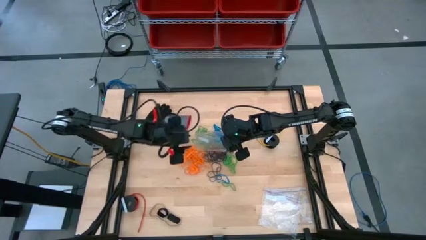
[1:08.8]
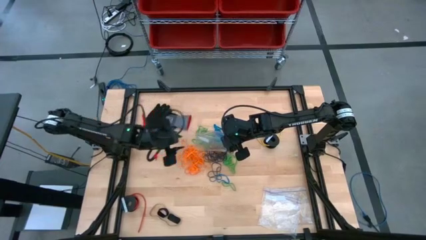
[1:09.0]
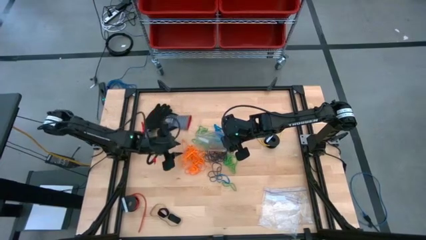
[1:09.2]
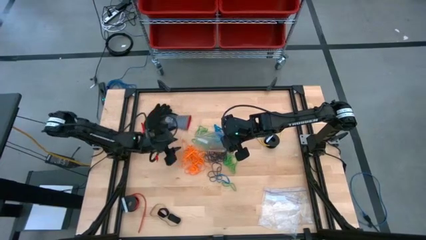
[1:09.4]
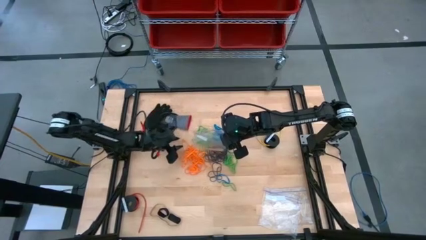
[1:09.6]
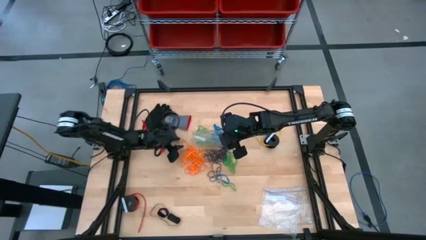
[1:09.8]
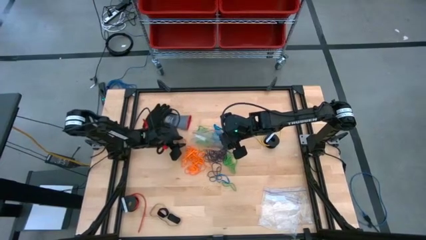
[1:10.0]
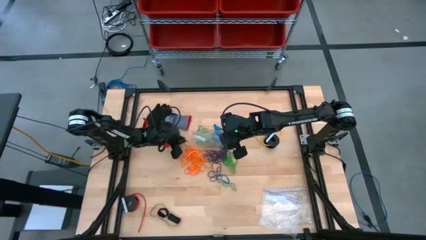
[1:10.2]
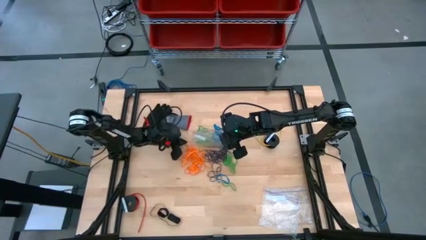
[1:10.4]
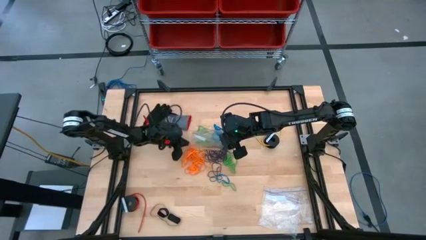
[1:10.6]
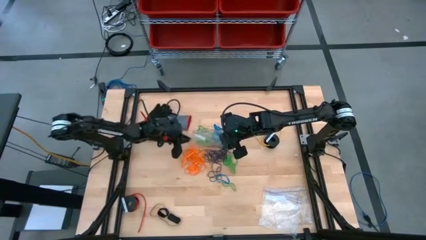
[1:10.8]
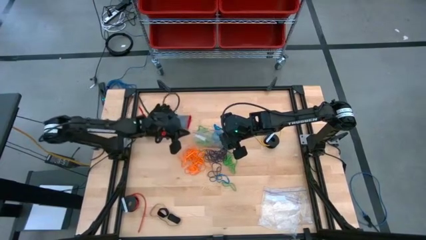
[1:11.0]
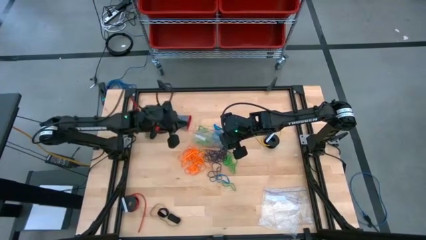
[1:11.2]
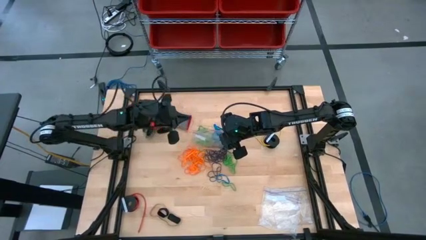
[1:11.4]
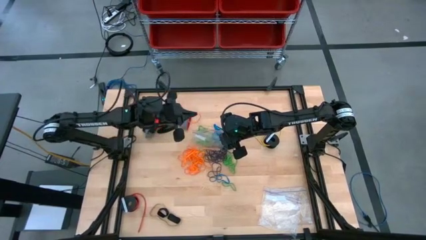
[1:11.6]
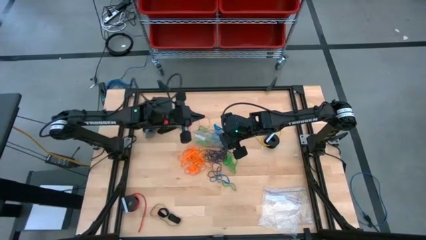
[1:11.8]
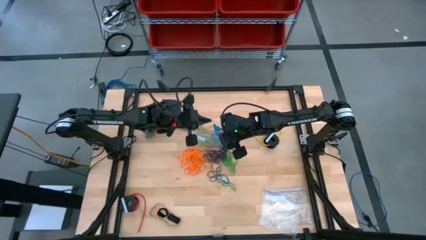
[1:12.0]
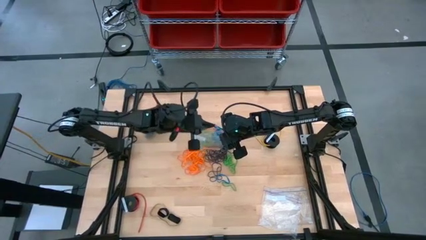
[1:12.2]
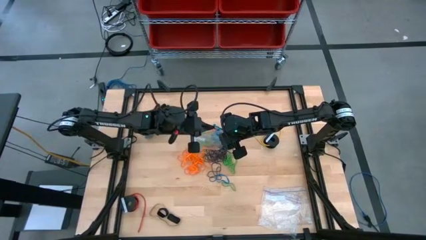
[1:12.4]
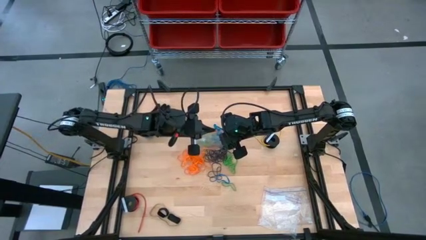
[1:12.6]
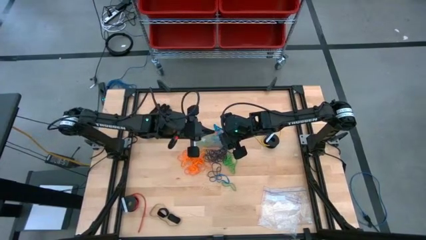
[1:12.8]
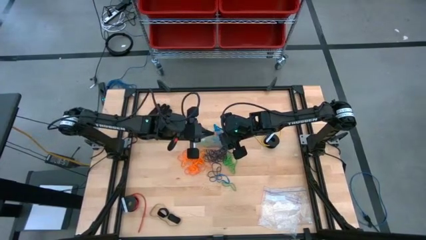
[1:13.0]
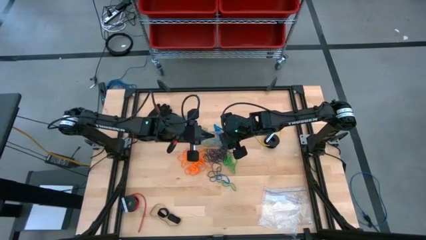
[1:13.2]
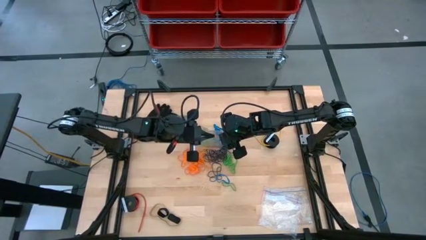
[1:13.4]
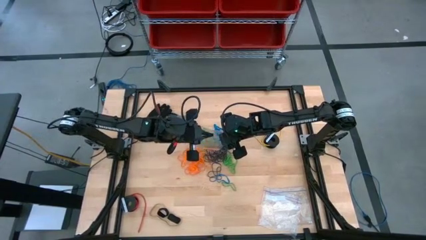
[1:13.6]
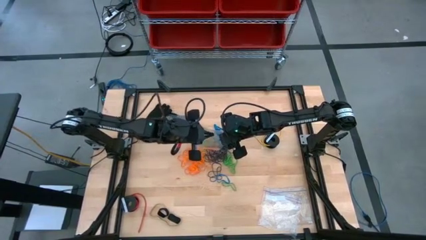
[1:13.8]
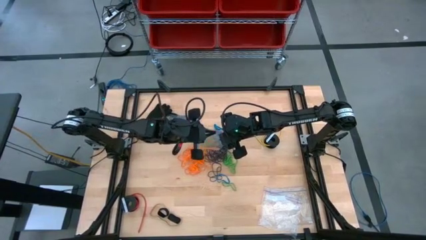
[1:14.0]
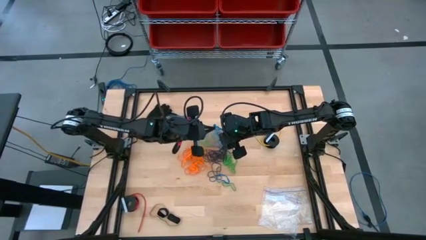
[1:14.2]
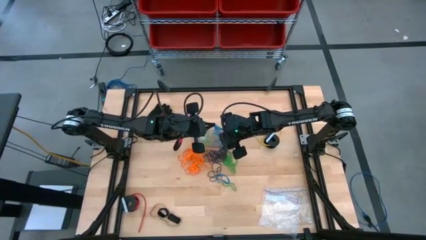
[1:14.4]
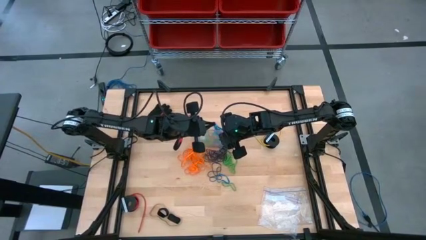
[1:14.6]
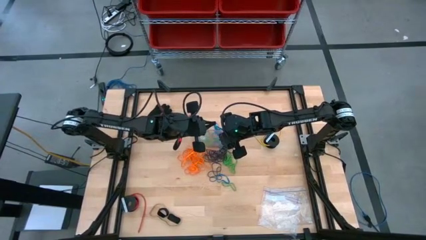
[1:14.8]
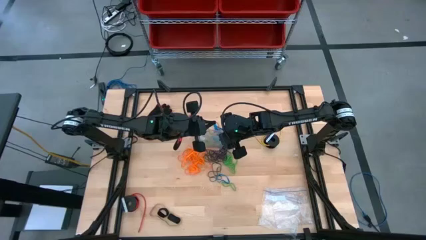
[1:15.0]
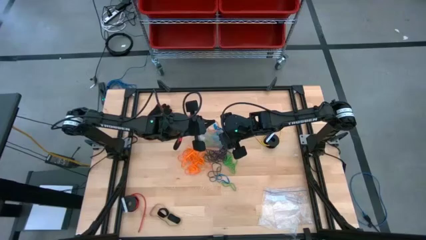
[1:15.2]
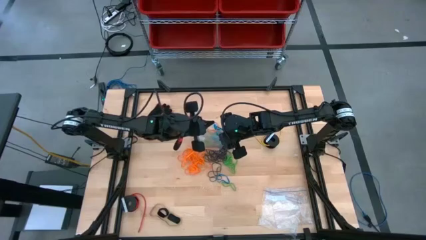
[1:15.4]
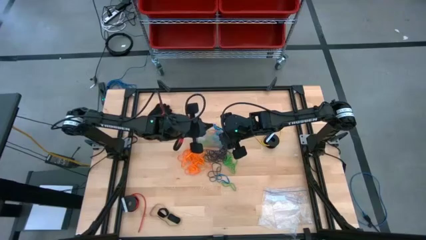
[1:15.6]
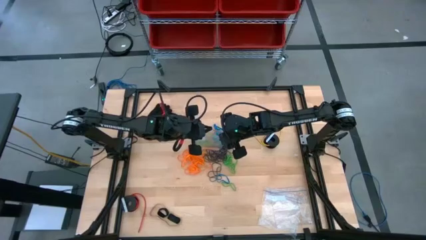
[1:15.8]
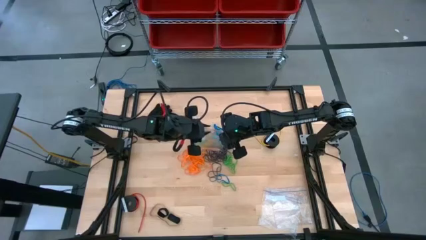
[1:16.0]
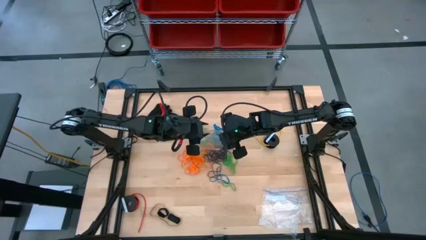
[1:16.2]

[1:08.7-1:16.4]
Task: Sort rubber bands
Put the orange rubber band into the transparent zip bag

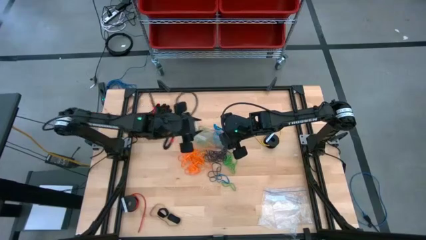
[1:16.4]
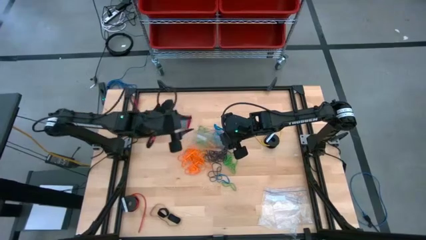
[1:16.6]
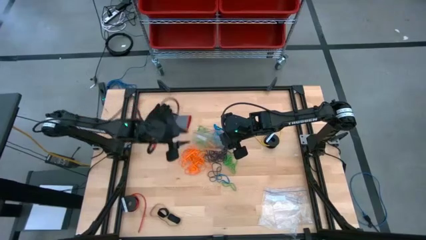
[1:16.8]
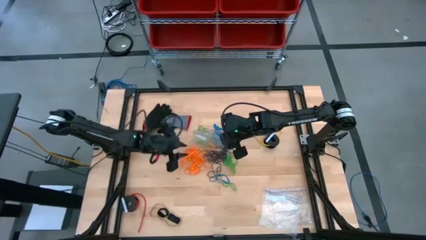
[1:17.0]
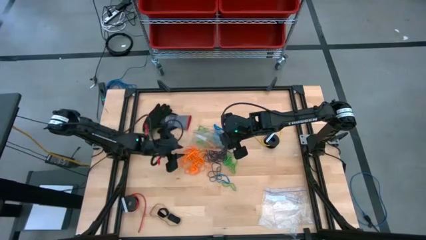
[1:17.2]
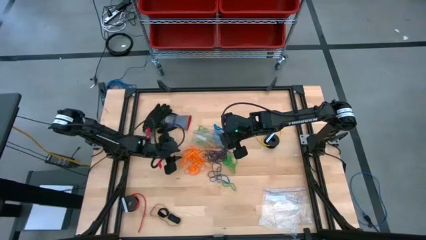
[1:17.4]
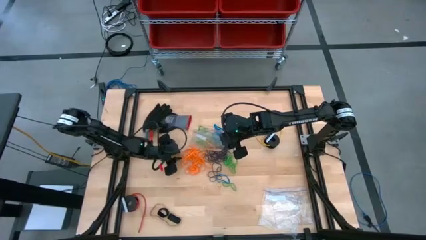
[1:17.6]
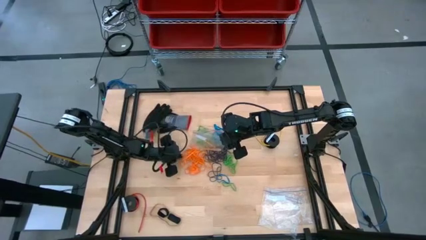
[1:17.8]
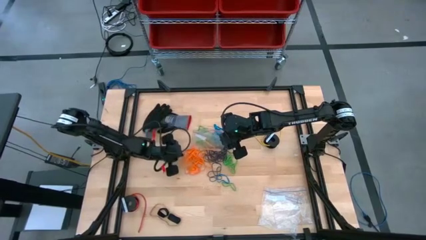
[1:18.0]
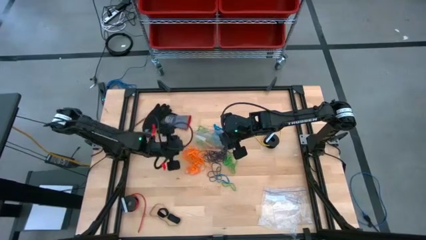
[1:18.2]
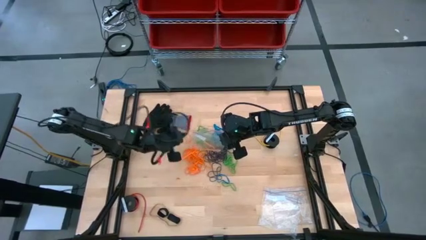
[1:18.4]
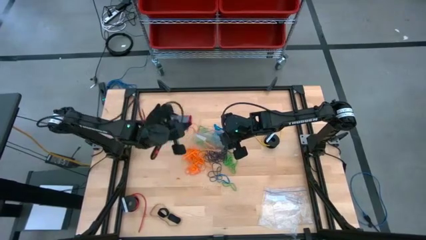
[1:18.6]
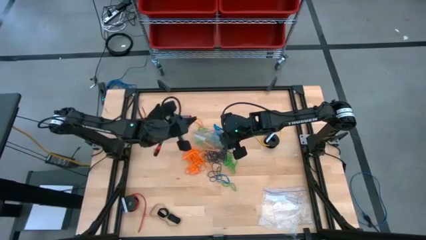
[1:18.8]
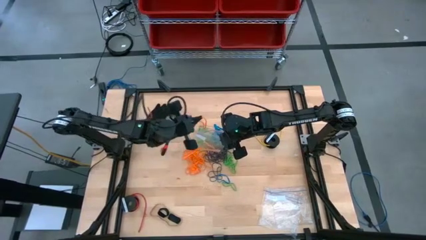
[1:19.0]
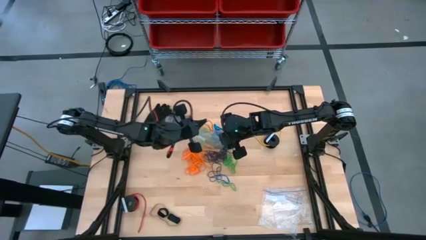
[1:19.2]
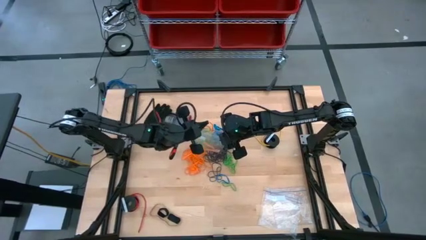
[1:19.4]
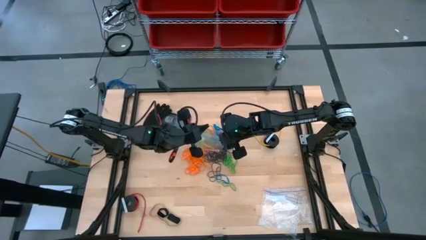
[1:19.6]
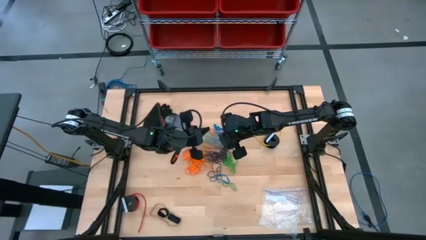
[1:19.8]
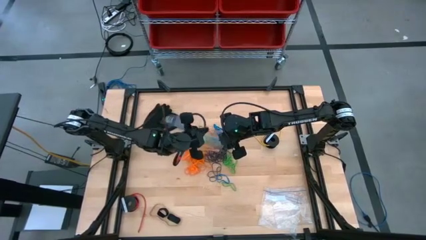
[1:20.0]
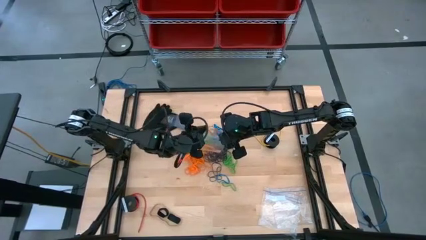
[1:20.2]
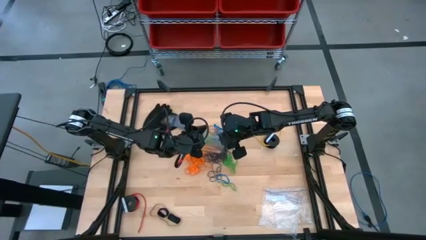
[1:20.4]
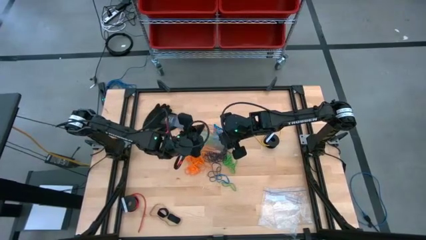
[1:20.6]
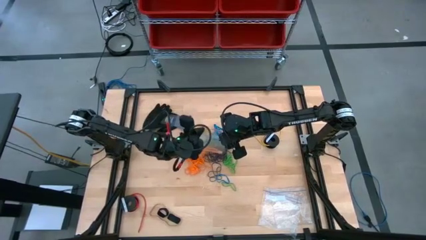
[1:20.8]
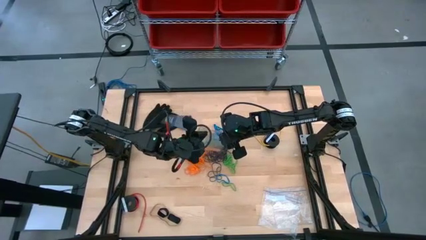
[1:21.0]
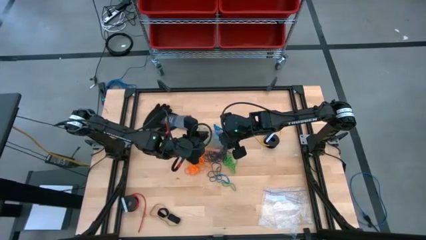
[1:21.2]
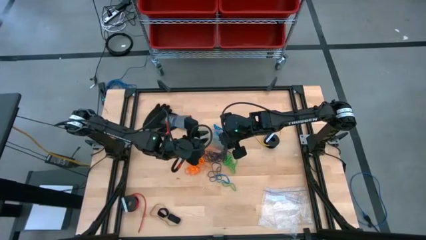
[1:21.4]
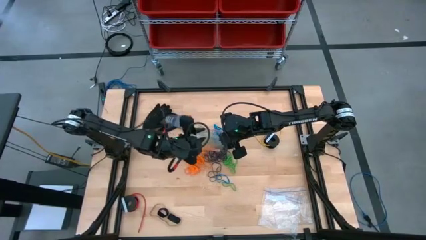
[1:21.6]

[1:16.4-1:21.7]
Put the orange rubber band into the transparent zip bag

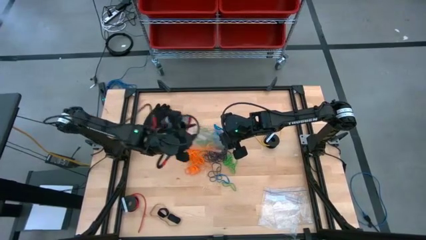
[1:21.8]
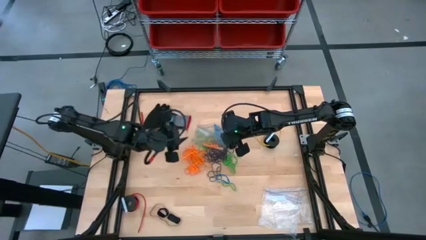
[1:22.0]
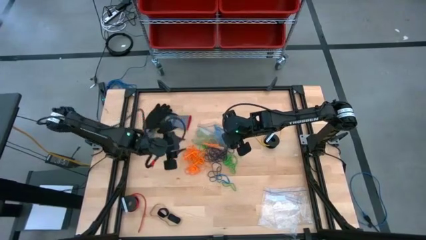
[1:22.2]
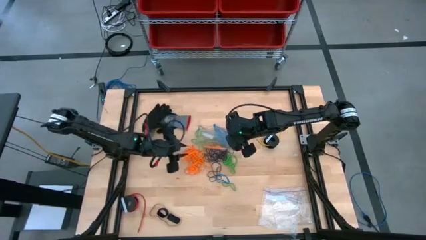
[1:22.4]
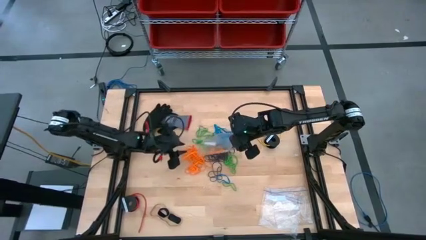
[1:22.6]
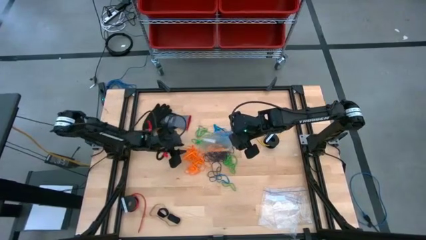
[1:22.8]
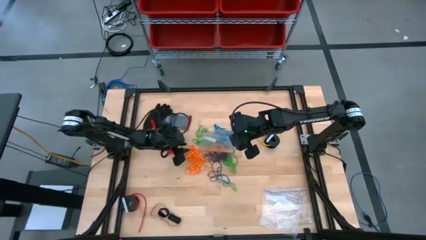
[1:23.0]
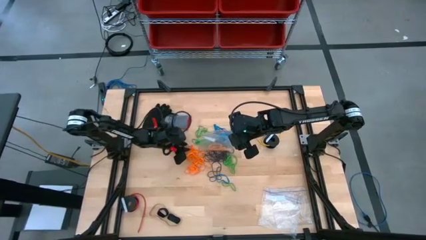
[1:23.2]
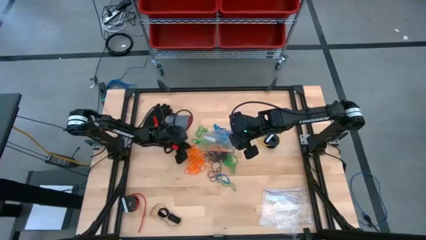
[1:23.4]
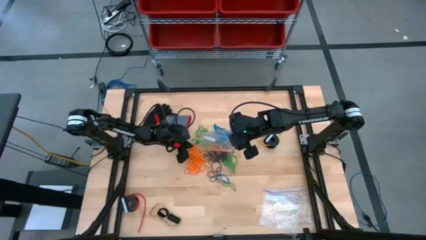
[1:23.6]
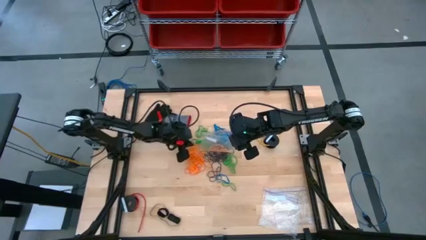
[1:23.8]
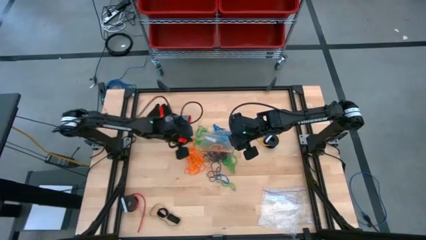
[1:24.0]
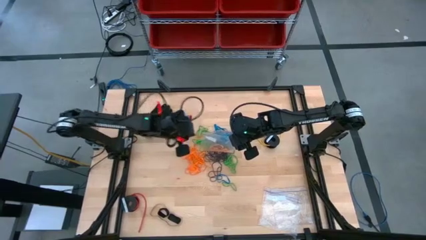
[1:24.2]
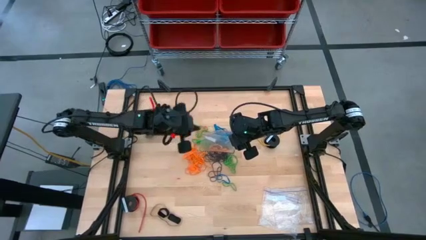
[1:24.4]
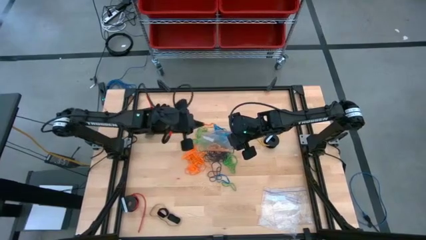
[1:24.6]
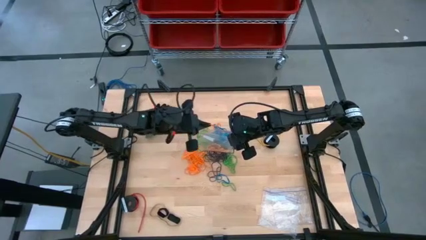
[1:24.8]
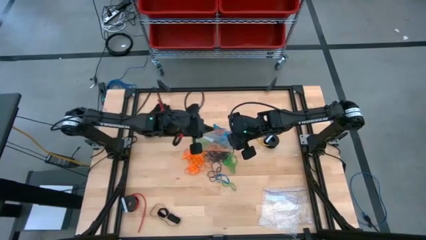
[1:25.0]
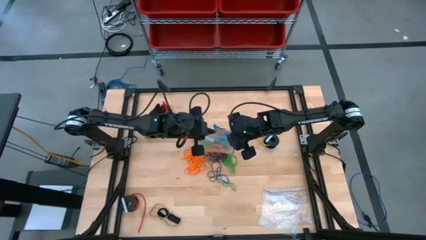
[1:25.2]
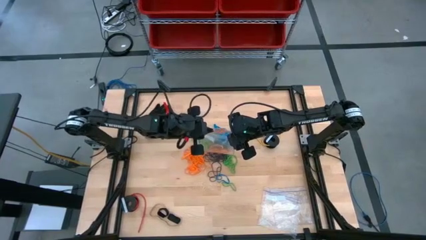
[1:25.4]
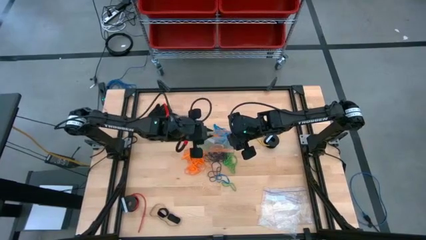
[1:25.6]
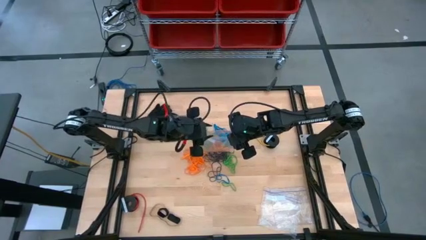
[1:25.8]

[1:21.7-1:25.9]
Put the orange rubber band into the transparent zip bag
